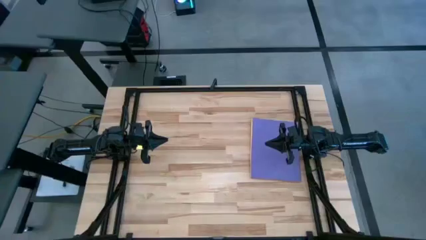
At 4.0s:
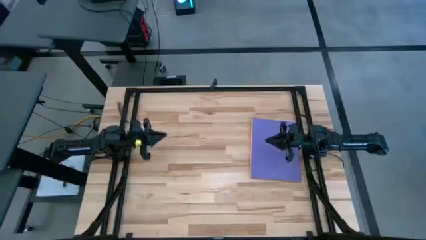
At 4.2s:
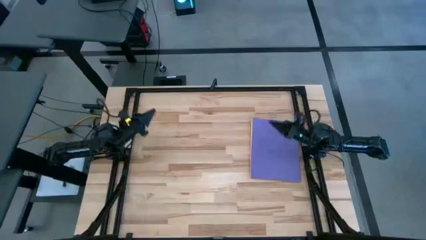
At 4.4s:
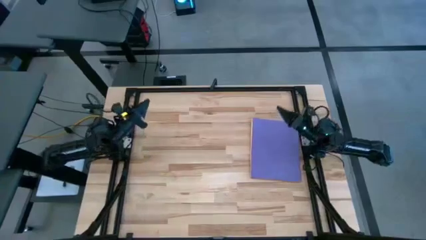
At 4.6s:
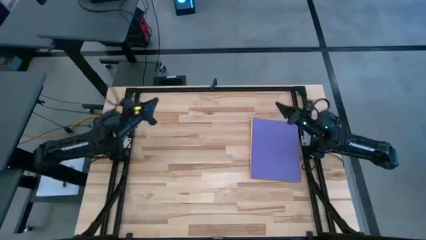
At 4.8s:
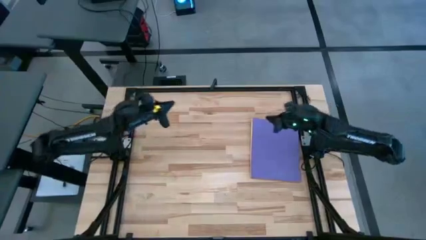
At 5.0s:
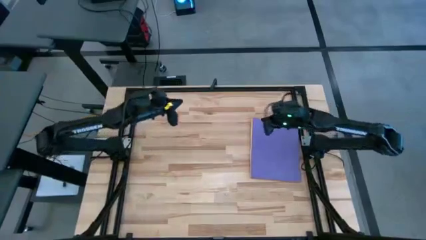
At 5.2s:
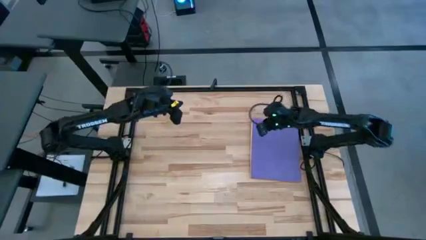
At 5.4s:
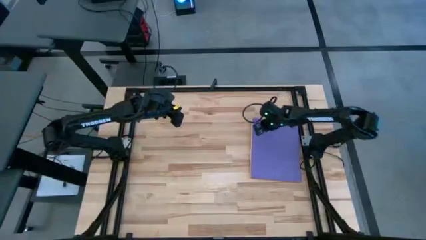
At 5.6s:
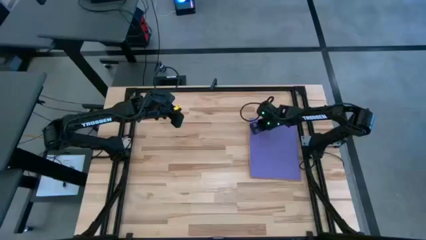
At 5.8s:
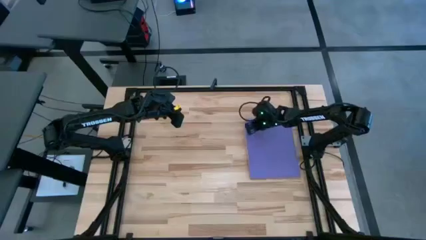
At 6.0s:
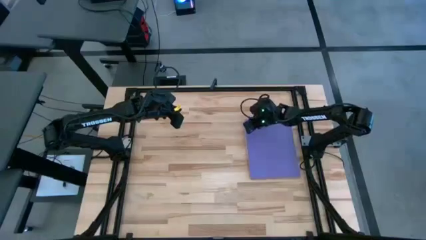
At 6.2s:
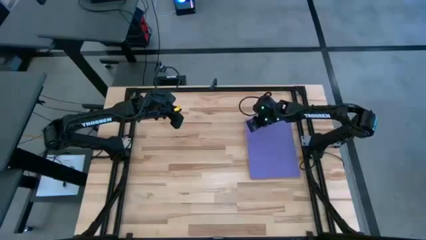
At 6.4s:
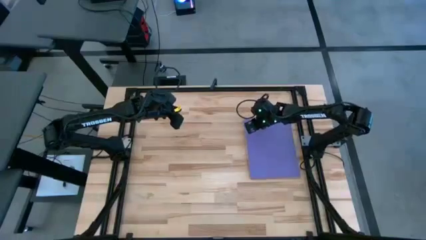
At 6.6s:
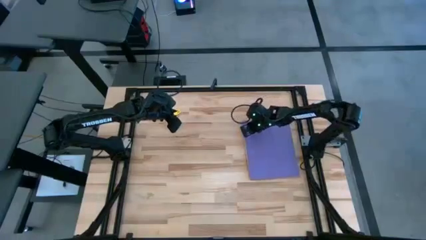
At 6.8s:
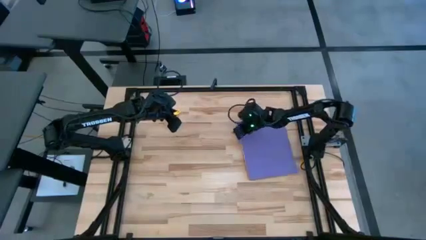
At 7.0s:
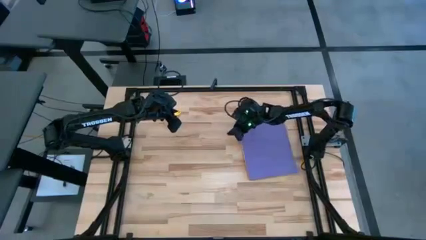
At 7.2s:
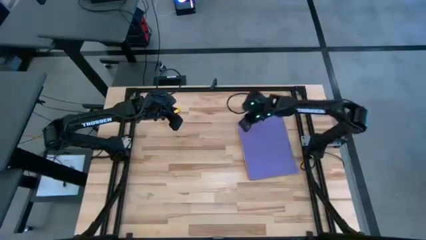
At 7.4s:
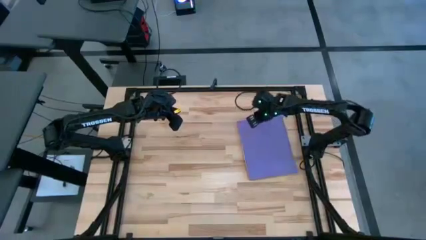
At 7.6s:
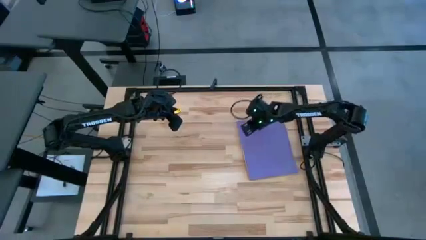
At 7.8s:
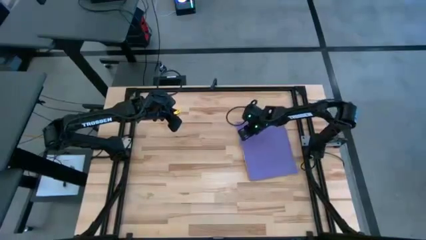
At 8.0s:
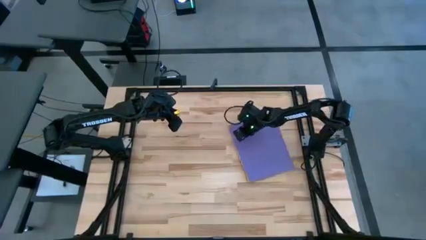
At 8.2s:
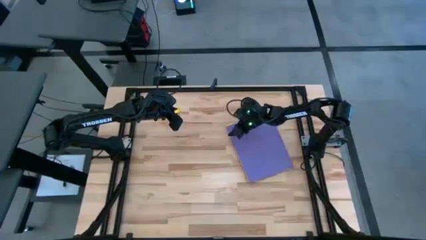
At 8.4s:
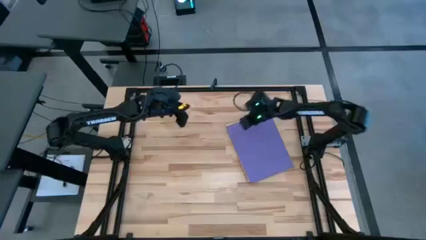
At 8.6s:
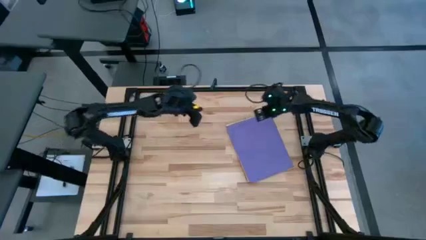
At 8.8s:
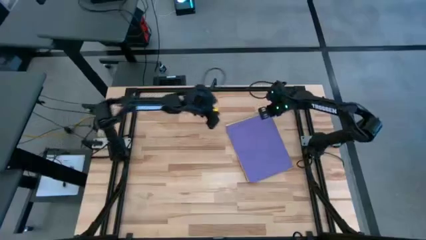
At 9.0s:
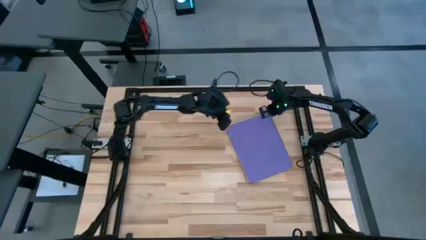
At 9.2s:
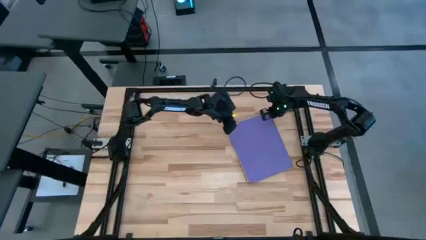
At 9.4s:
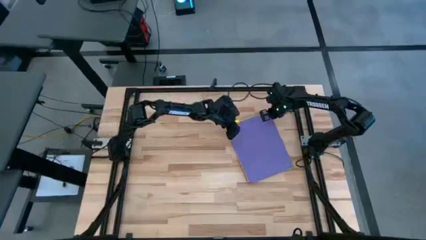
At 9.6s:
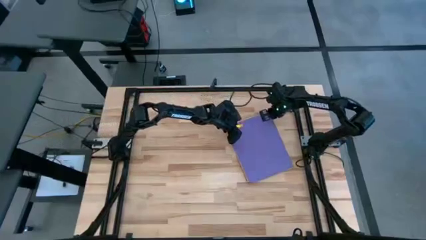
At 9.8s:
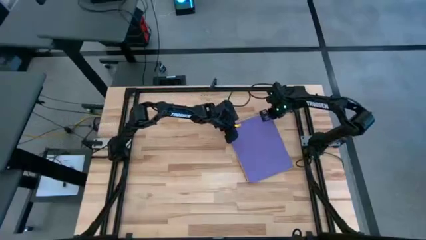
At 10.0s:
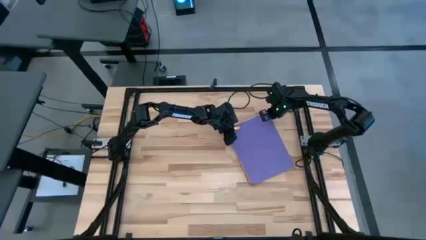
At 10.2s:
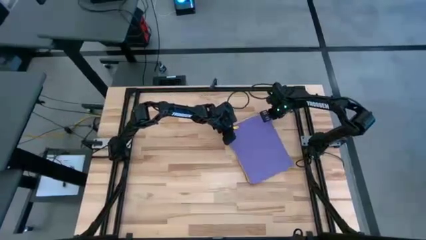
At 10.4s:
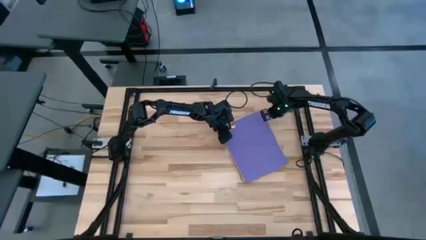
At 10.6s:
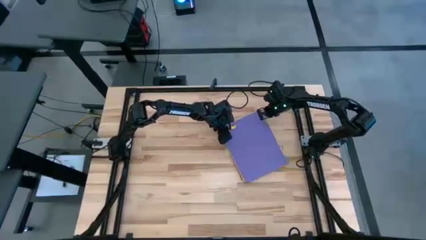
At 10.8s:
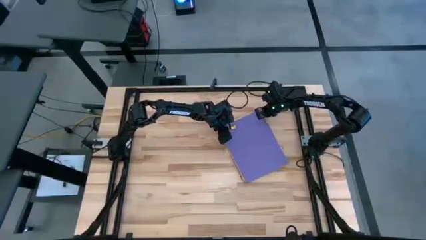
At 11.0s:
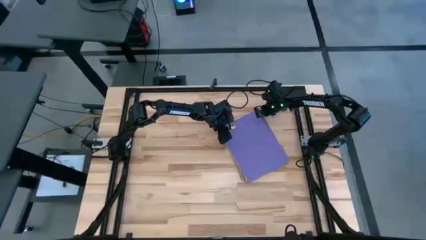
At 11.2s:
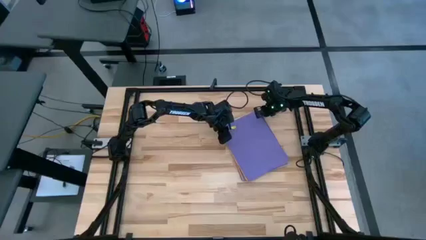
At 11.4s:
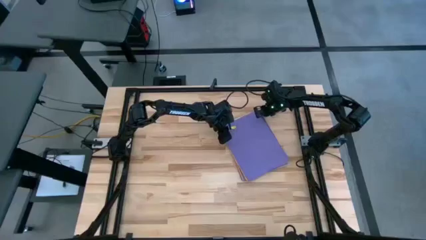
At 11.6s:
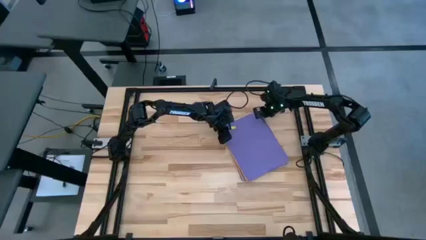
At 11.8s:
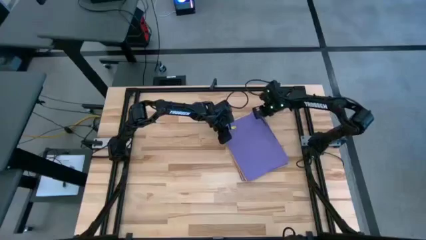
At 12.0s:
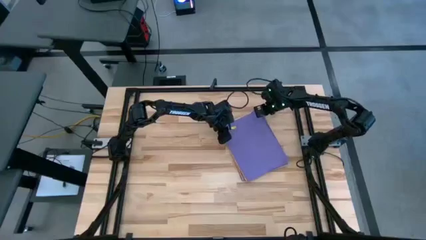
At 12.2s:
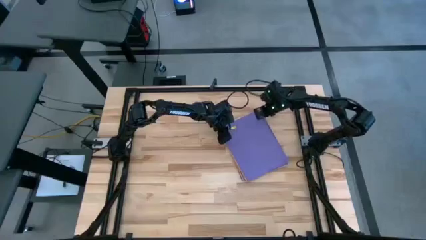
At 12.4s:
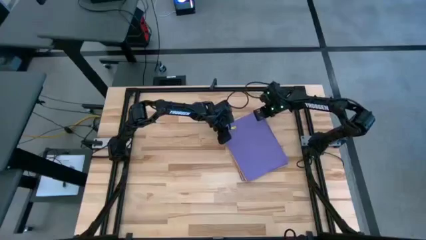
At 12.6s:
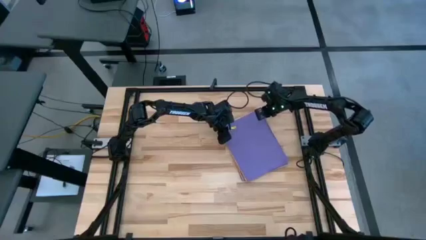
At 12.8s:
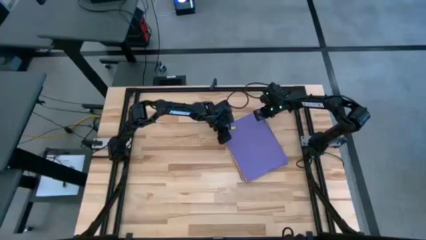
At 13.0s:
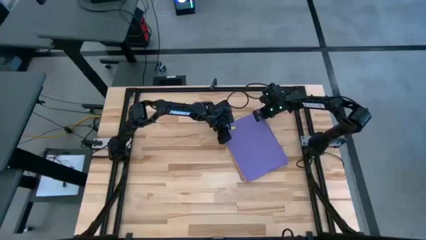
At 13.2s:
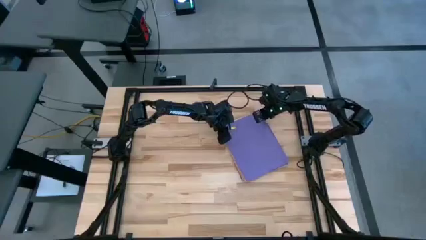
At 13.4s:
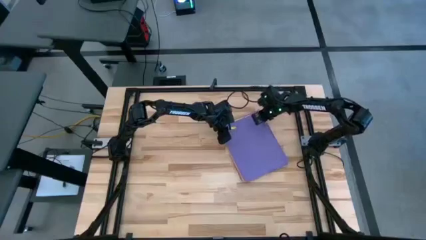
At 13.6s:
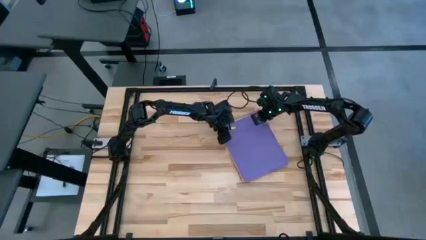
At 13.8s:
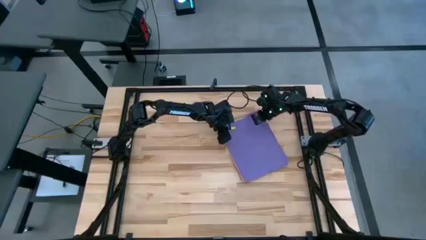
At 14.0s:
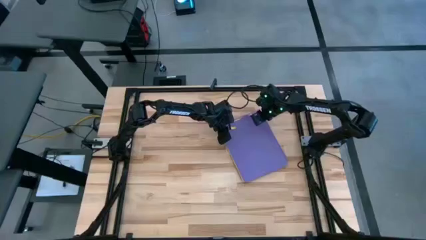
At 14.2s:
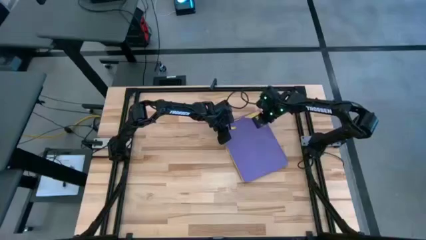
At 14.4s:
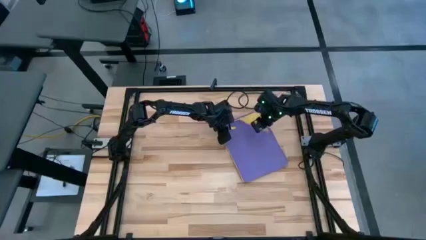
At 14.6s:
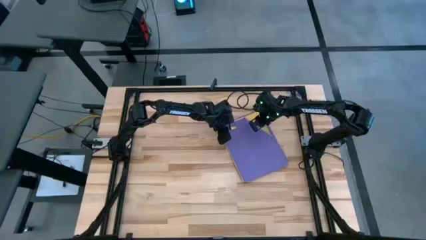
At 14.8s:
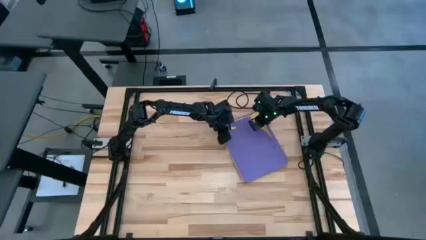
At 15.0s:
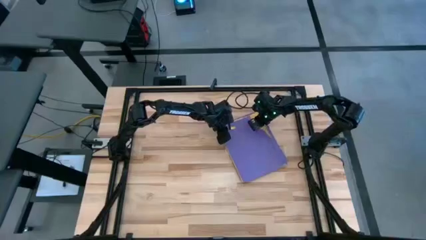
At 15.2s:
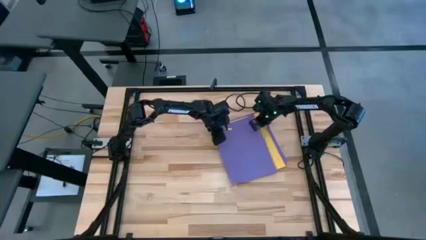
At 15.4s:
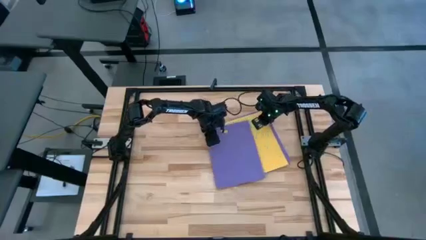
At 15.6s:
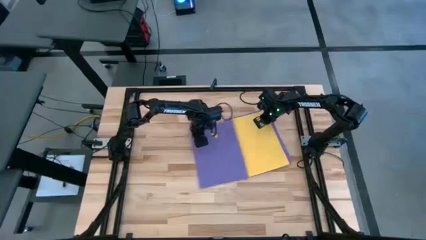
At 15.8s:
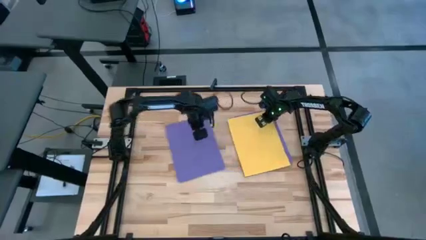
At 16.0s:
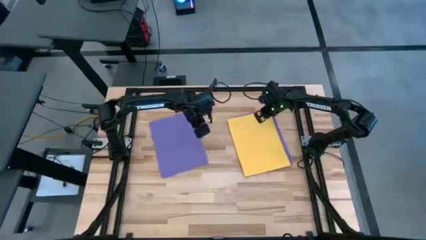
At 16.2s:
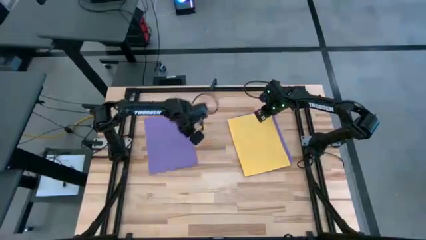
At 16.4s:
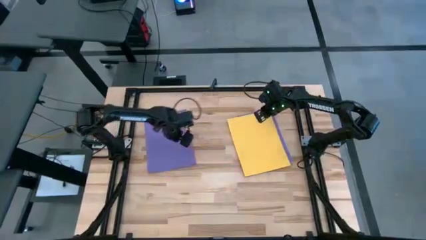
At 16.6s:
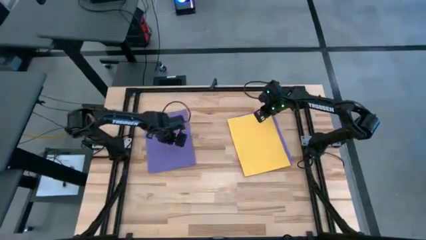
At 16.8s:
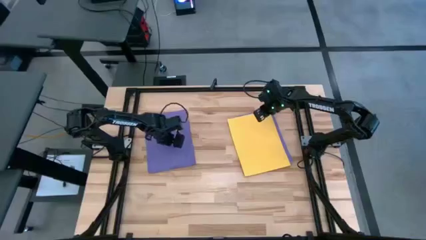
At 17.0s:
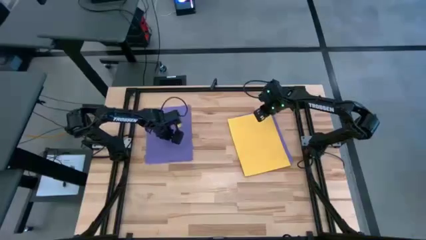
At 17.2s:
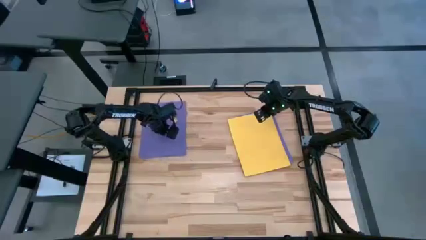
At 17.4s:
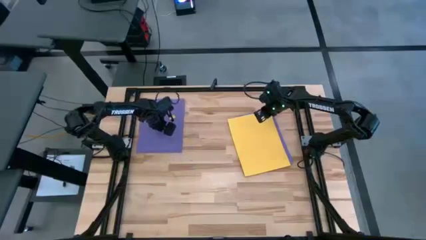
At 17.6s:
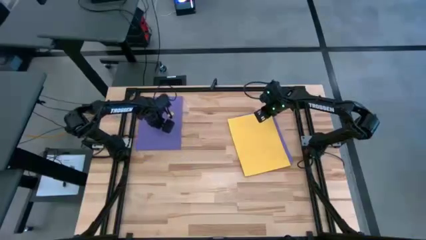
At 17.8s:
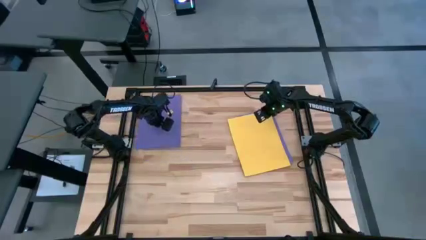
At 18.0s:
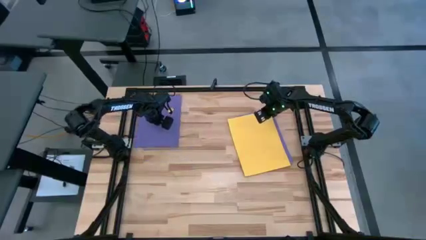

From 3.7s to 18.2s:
Task: Organize paper
Move the purple paper to the top left of the table

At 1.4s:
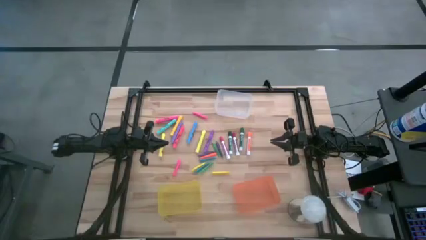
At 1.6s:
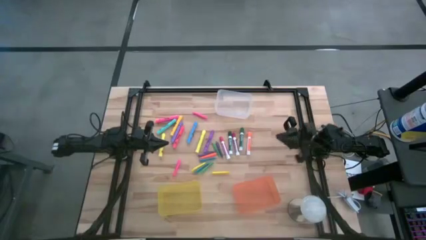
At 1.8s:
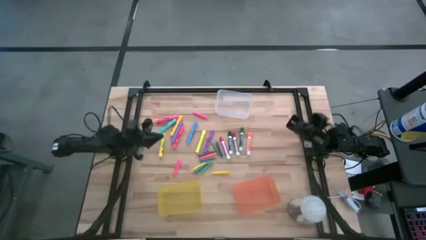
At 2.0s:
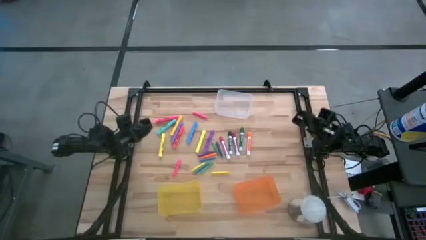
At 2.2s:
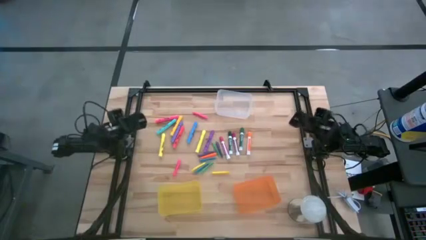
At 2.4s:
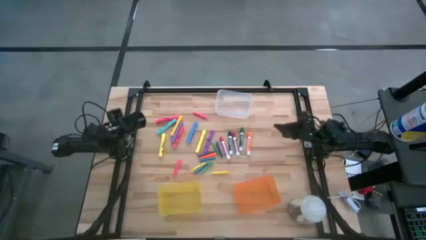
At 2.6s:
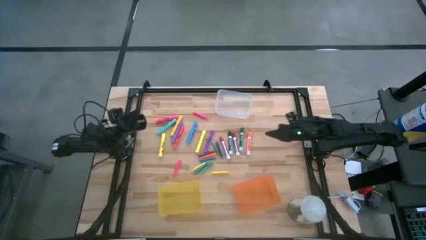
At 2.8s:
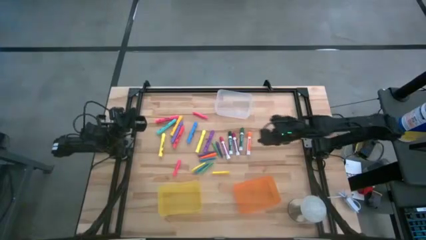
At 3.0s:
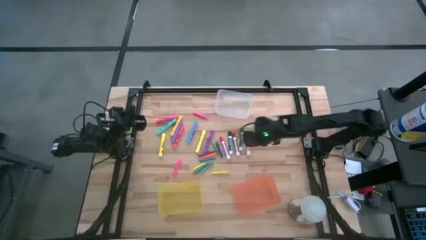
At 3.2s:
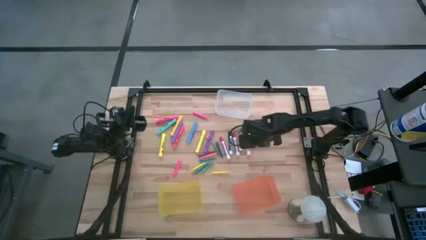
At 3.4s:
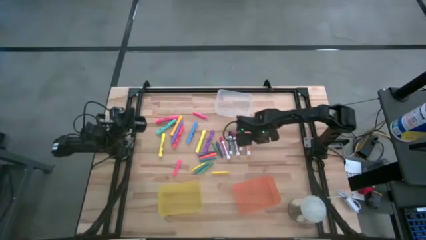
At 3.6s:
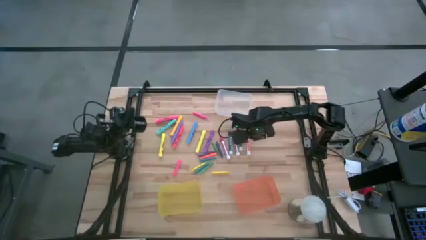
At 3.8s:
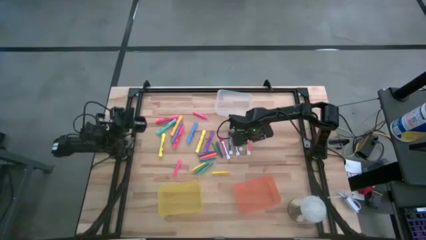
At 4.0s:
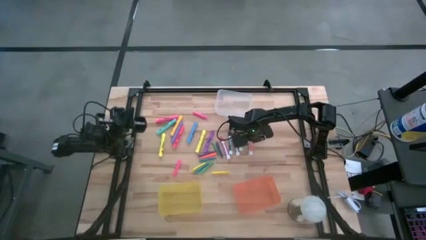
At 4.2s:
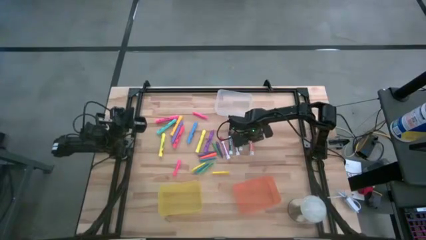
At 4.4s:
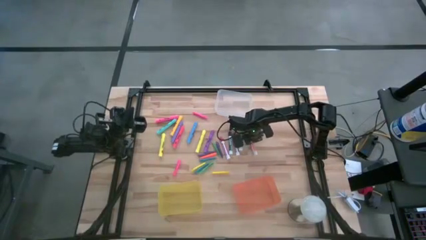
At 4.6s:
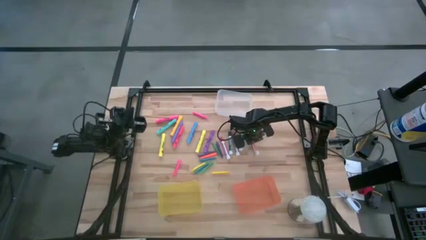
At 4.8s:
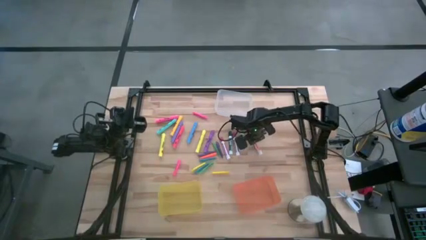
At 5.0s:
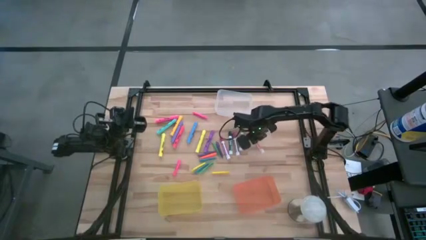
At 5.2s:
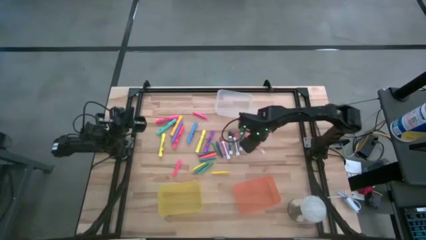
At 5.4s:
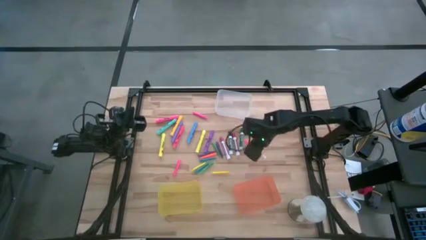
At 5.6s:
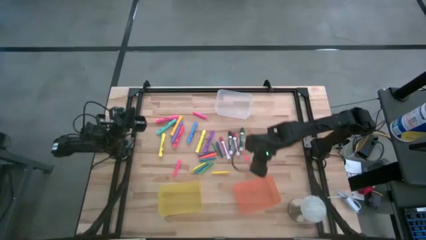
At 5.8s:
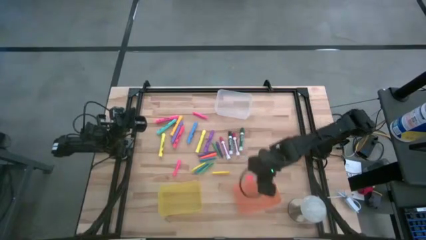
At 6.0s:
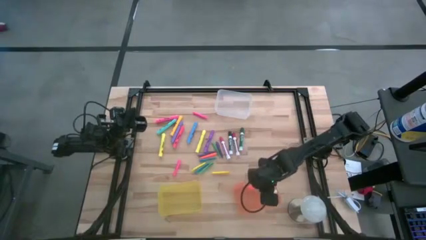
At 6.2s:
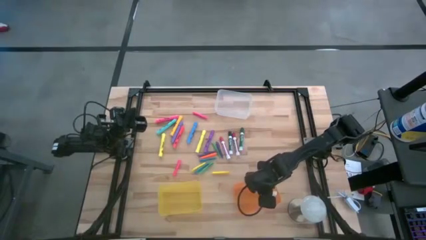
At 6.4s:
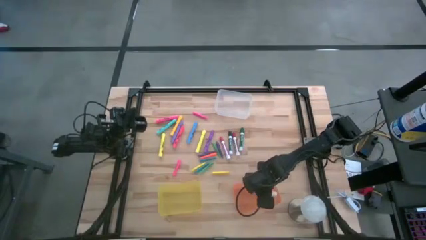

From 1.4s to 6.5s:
Task: Pick & Place Markers
Put the orange marker pen into the orange bin
